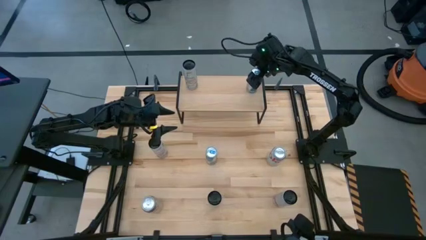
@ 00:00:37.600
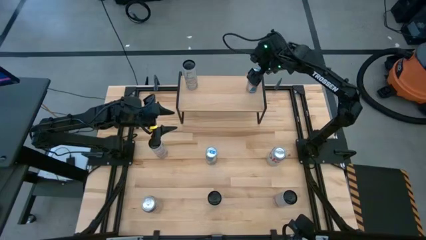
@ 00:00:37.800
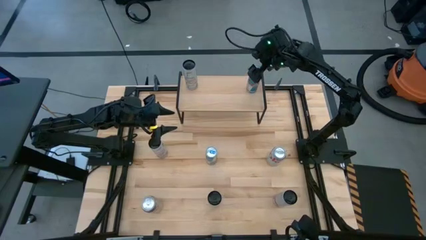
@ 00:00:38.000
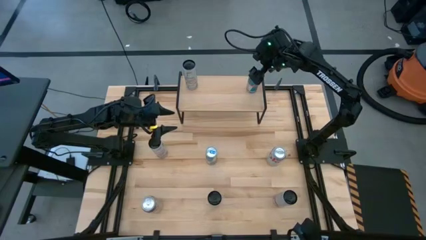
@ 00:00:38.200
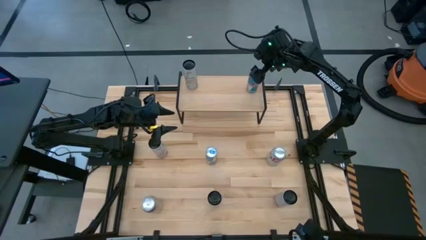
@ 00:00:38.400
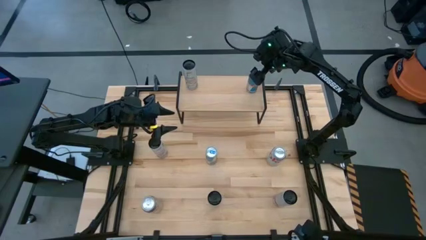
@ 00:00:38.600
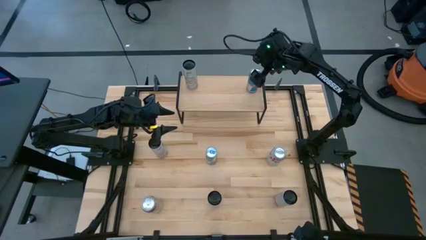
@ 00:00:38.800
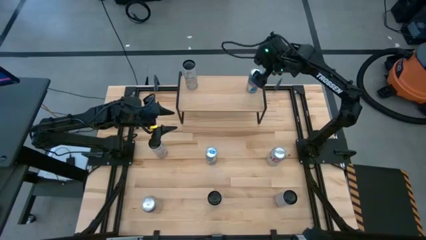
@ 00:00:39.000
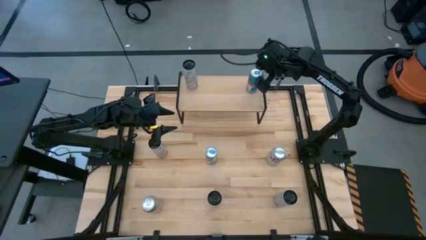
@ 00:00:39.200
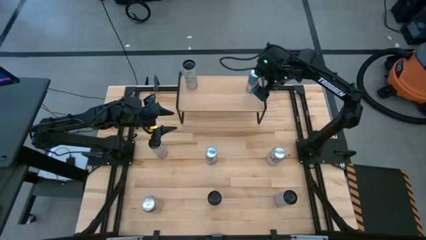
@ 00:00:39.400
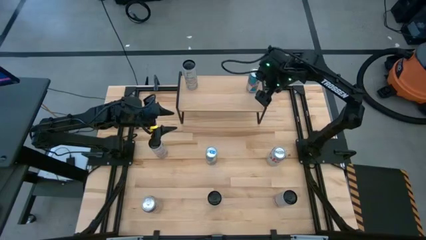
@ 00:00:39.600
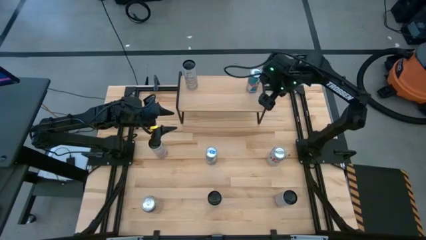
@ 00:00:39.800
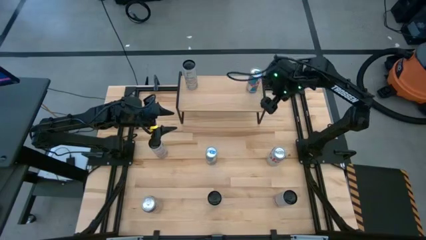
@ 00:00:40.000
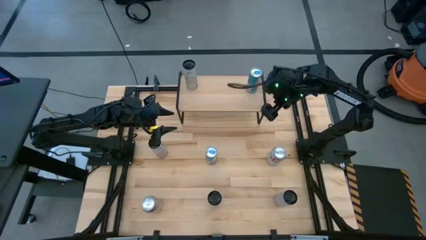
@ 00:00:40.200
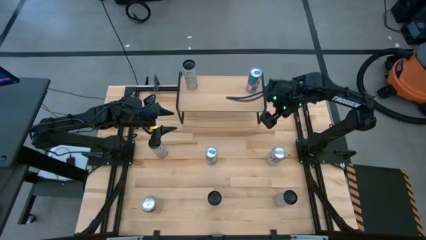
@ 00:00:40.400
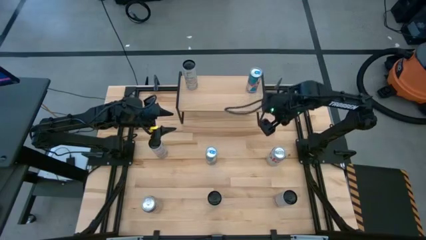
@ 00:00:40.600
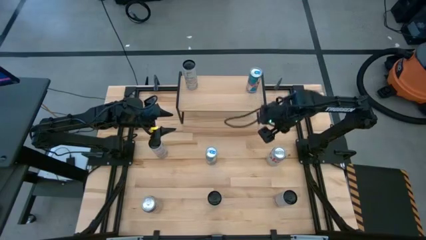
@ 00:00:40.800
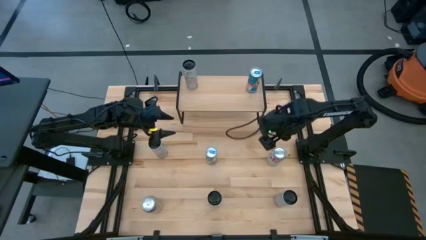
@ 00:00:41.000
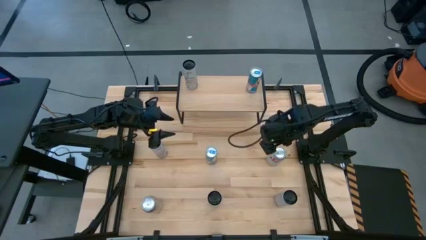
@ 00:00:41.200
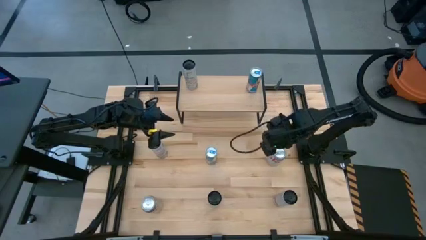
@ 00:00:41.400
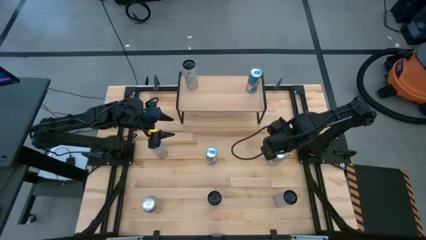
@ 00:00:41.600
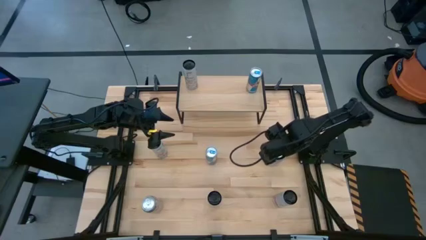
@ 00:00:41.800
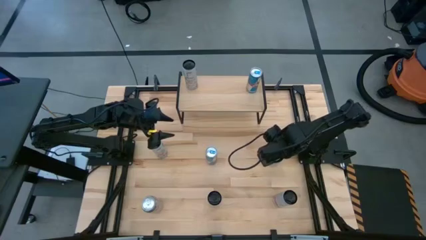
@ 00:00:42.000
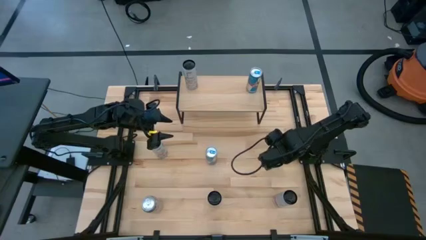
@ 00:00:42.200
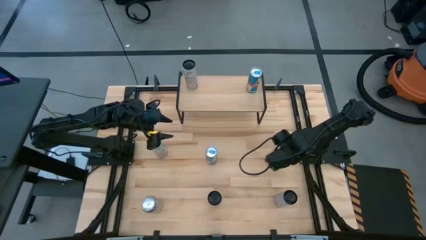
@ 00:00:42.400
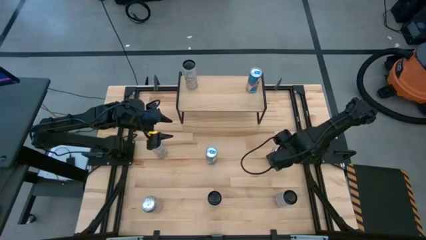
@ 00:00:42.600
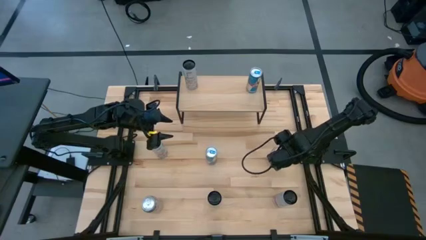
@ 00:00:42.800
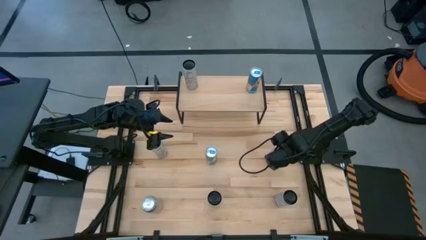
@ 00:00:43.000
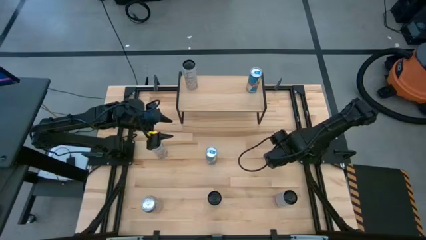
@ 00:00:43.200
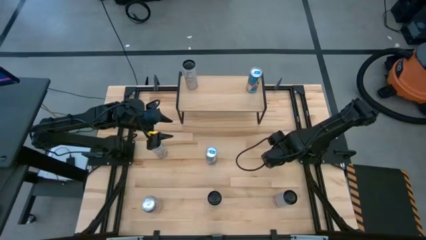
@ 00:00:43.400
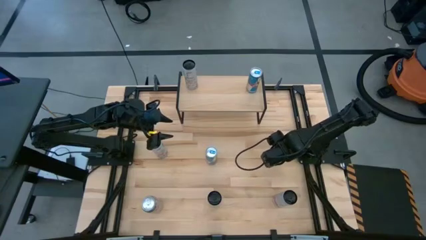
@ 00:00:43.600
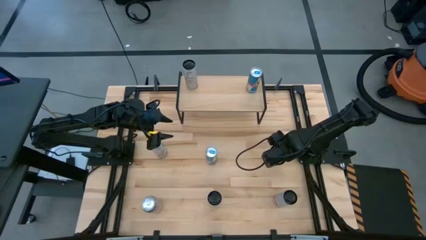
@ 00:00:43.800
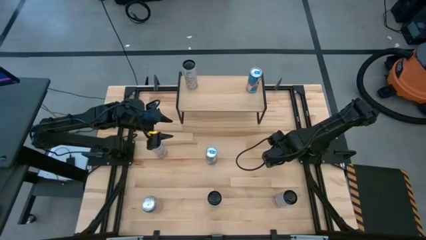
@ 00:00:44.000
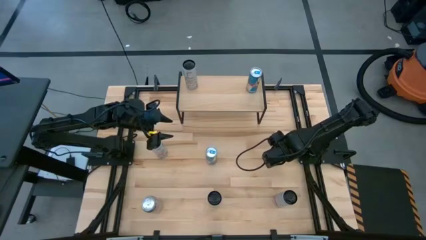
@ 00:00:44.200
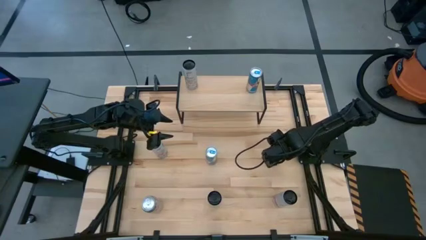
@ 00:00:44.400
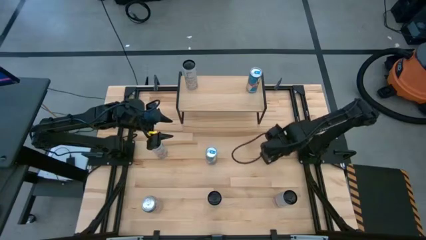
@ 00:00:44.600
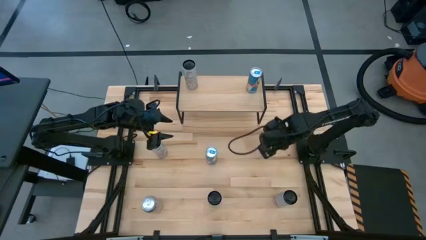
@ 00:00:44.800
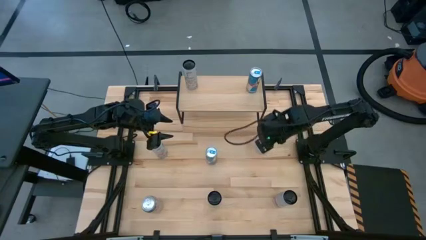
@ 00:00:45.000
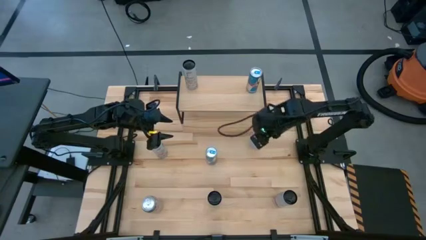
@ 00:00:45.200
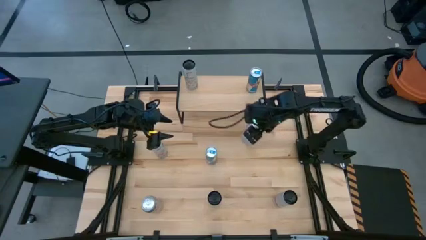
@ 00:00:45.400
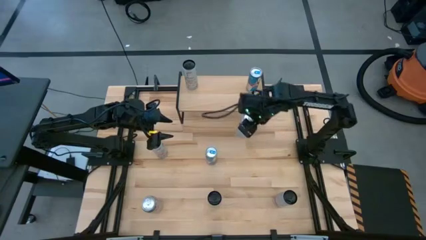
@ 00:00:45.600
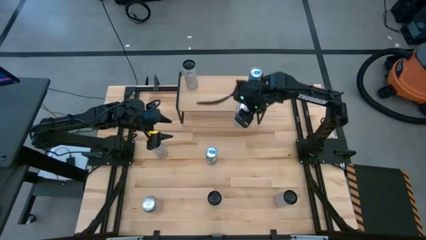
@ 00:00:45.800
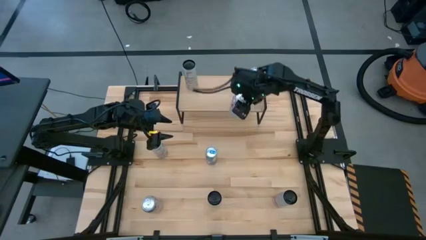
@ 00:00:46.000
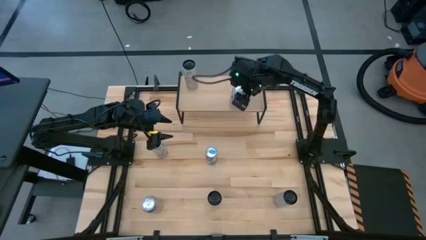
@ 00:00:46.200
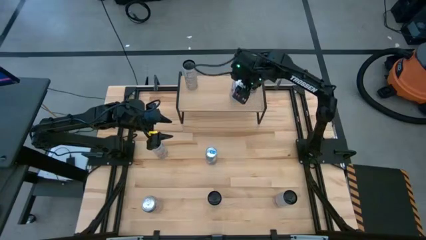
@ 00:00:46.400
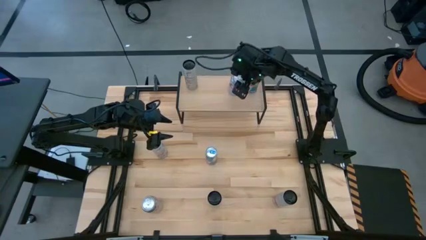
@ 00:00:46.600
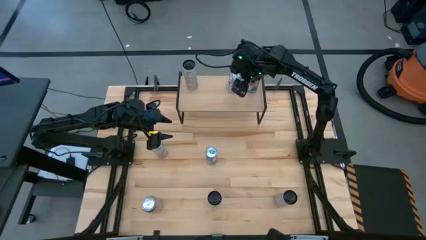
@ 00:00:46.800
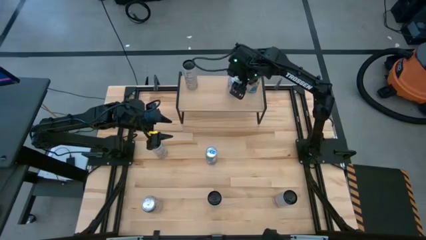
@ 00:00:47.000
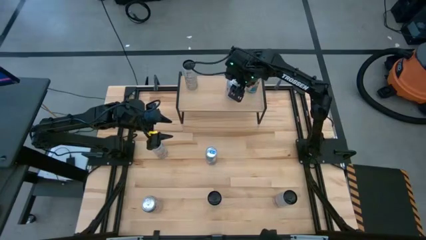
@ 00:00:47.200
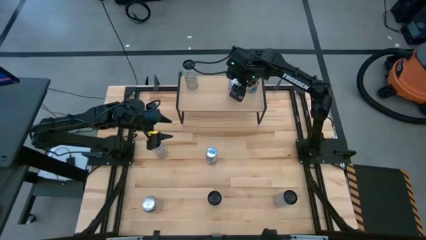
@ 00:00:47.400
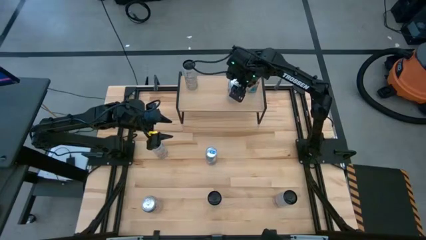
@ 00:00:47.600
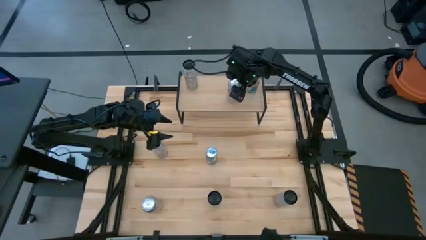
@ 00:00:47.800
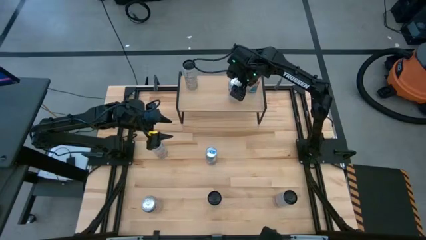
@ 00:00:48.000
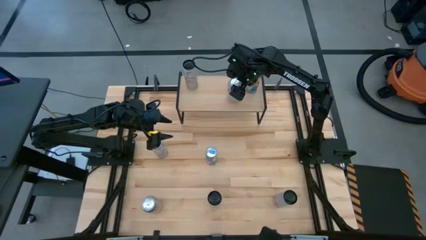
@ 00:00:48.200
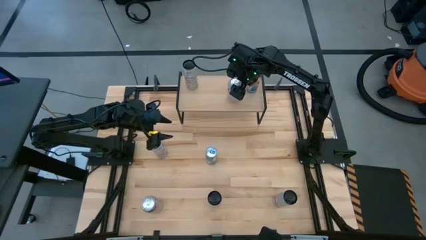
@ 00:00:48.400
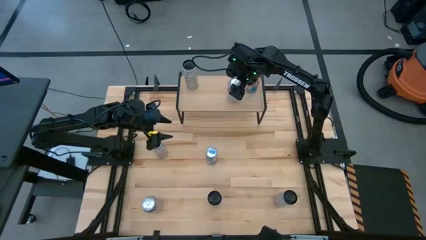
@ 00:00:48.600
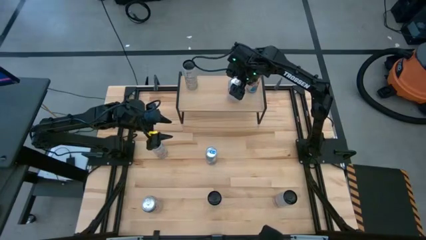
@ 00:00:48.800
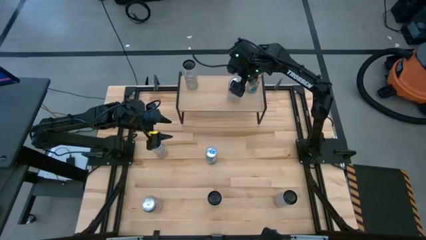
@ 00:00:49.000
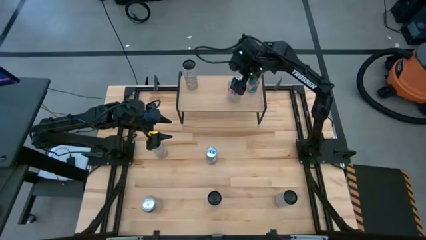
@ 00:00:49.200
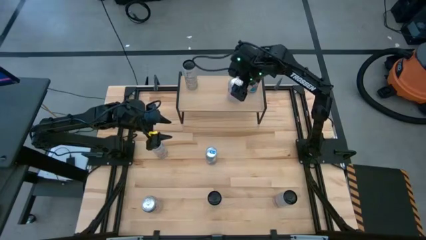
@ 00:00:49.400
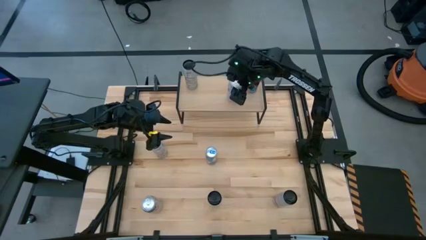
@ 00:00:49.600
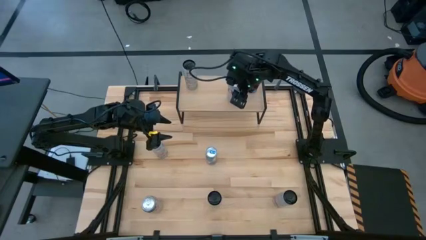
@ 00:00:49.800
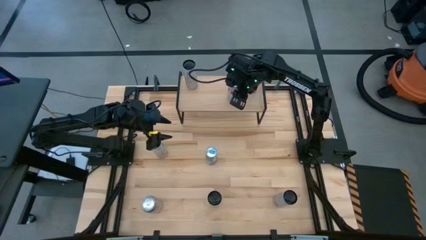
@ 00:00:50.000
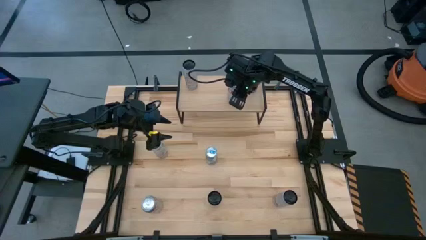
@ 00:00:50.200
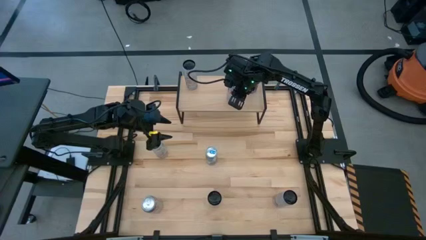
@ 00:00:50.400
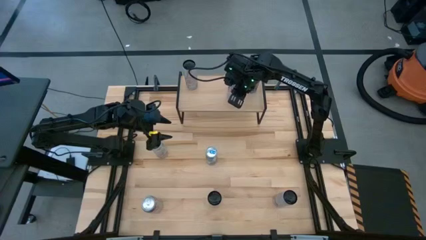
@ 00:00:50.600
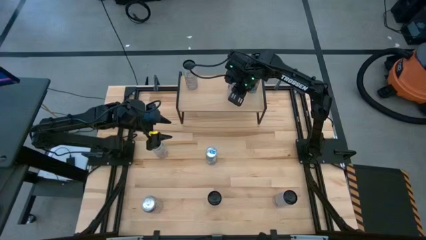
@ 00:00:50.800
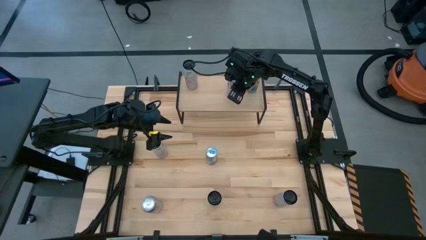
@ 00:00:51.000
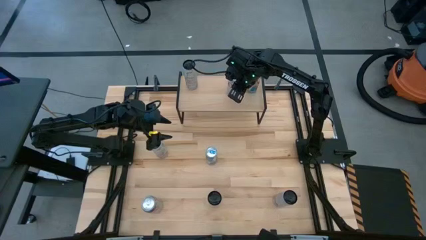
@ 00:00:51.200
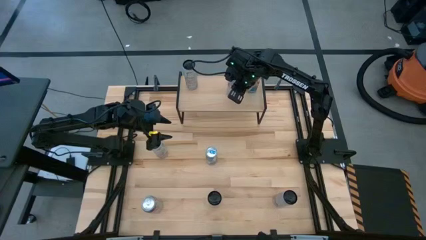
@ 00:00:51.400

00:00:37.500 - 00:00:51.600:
Task: Place canned beverage on shelf
Put the top red soda can on the shelf
